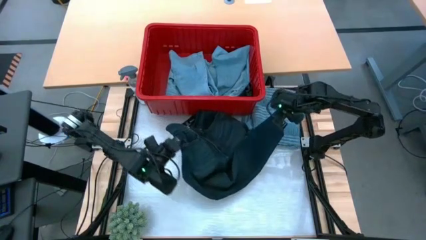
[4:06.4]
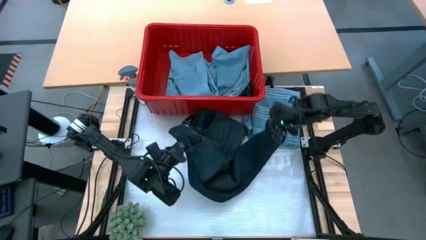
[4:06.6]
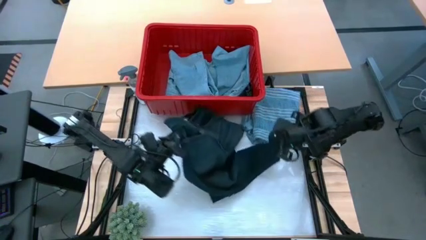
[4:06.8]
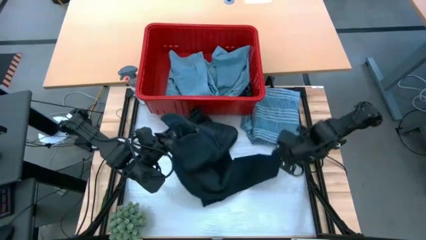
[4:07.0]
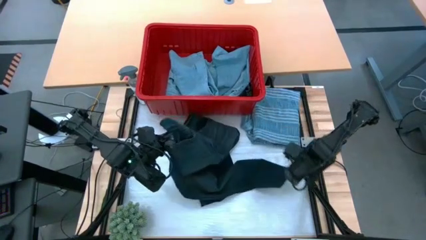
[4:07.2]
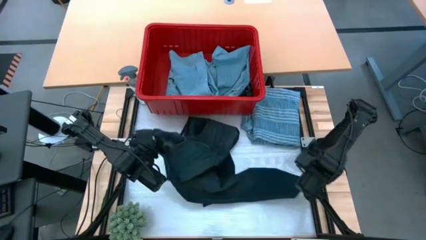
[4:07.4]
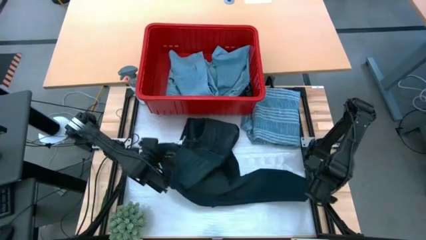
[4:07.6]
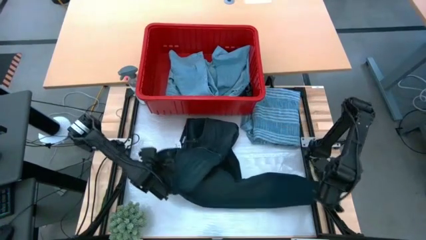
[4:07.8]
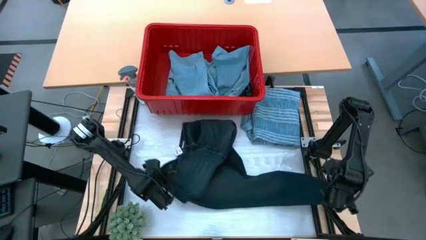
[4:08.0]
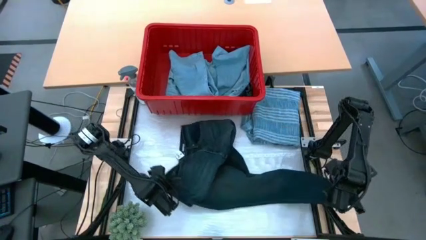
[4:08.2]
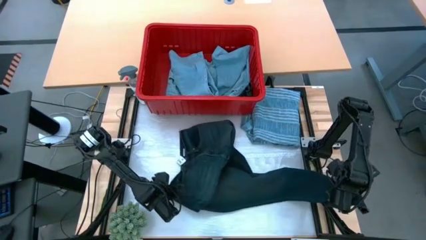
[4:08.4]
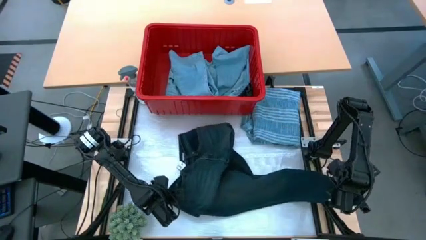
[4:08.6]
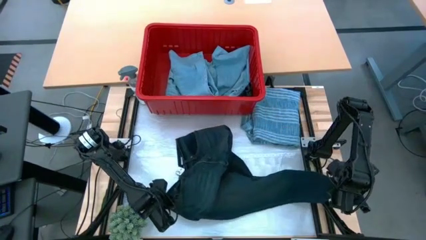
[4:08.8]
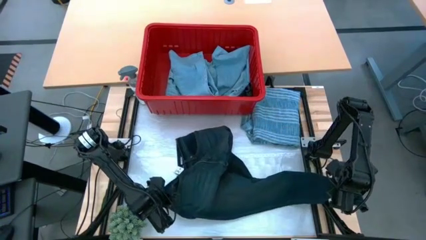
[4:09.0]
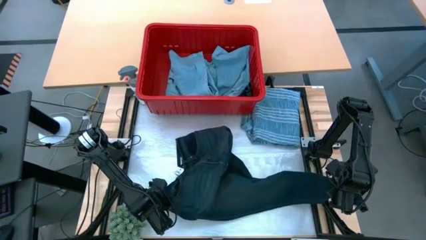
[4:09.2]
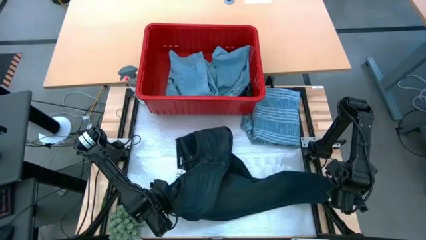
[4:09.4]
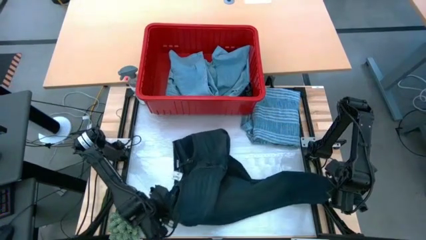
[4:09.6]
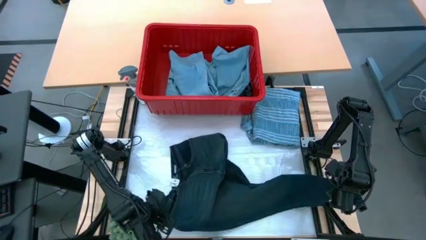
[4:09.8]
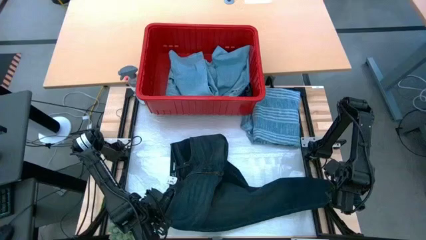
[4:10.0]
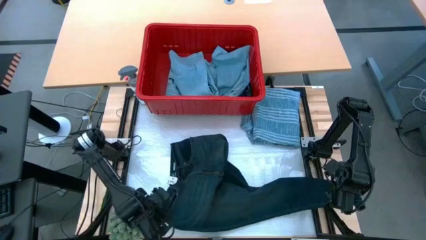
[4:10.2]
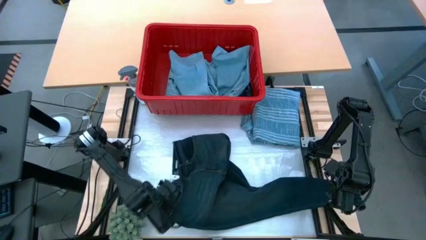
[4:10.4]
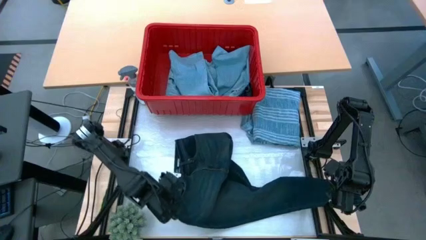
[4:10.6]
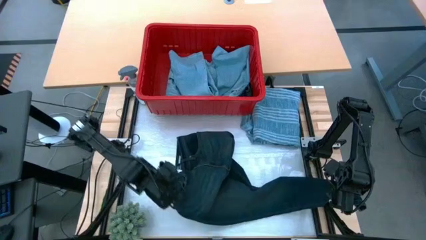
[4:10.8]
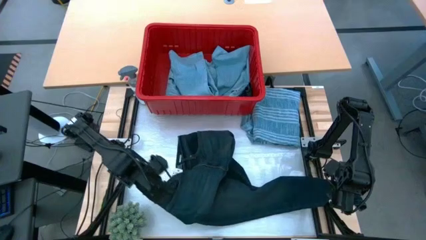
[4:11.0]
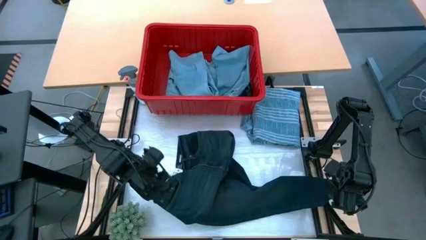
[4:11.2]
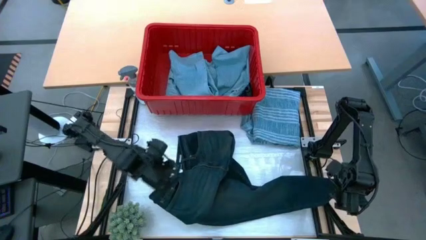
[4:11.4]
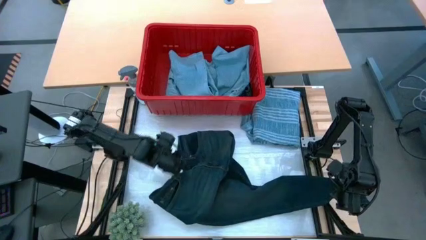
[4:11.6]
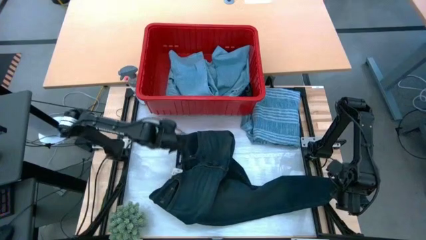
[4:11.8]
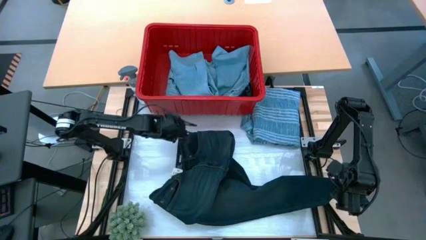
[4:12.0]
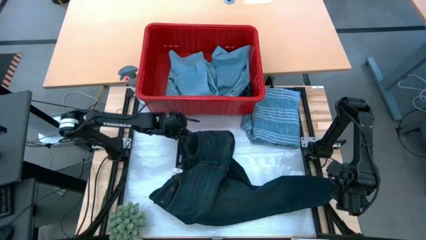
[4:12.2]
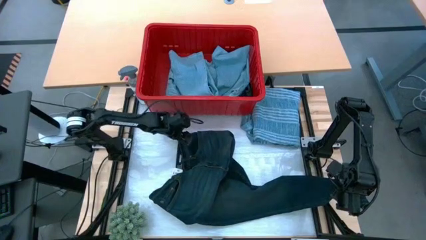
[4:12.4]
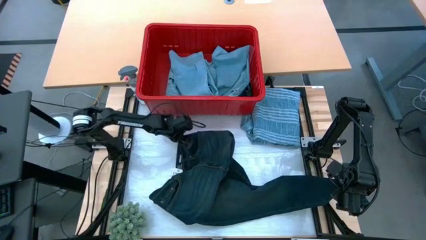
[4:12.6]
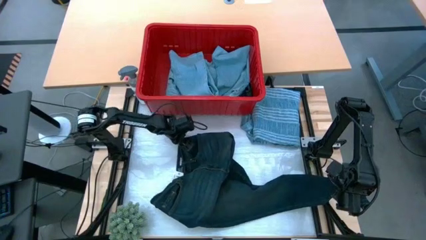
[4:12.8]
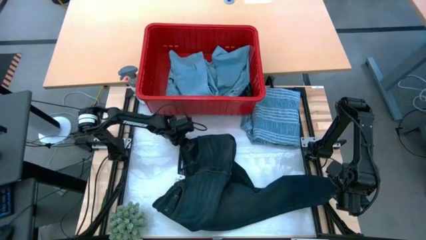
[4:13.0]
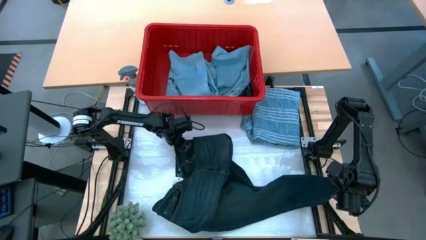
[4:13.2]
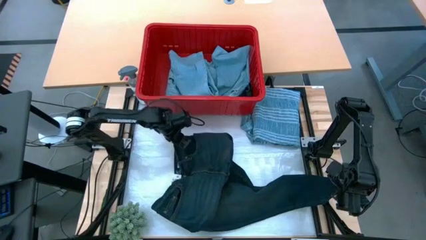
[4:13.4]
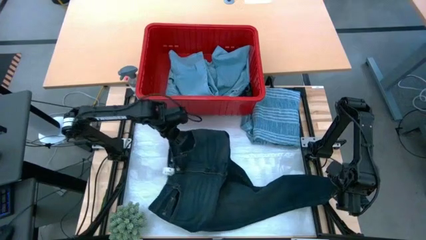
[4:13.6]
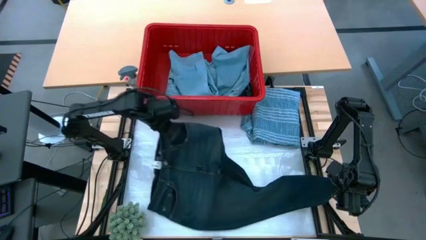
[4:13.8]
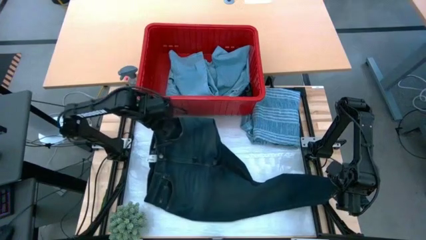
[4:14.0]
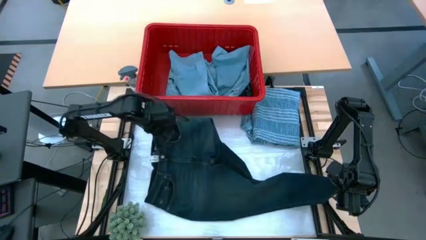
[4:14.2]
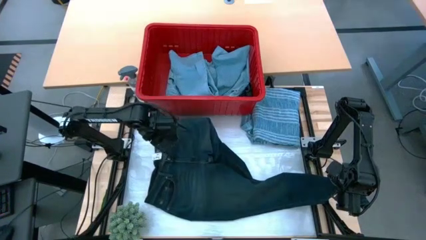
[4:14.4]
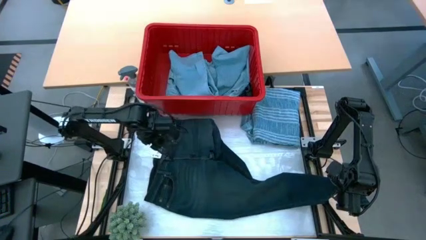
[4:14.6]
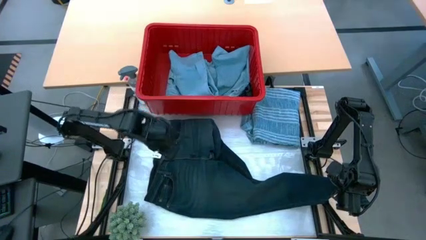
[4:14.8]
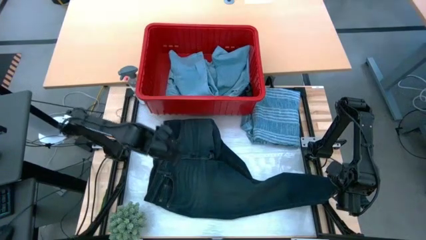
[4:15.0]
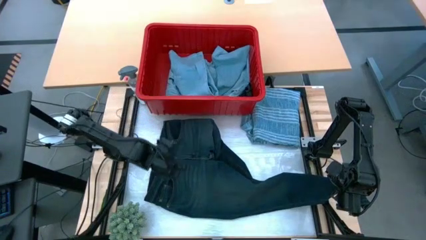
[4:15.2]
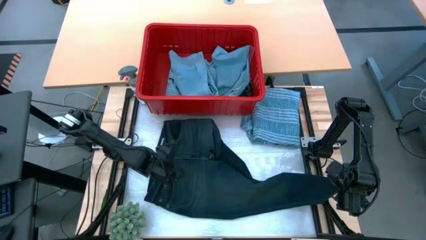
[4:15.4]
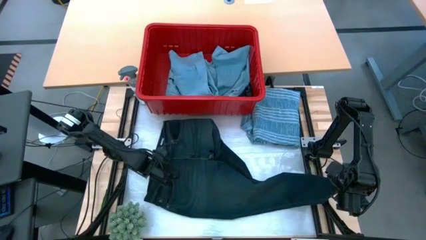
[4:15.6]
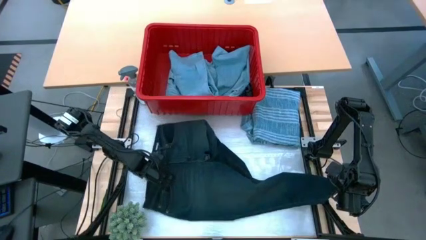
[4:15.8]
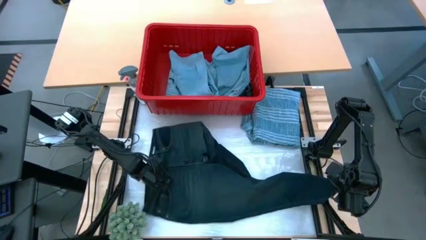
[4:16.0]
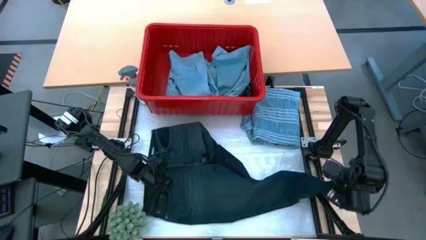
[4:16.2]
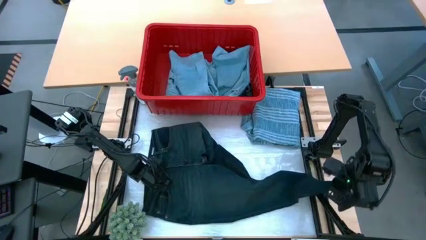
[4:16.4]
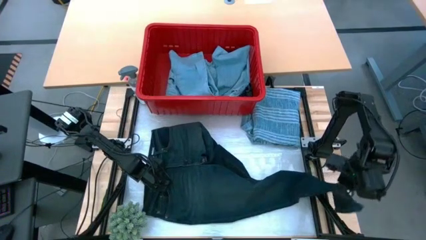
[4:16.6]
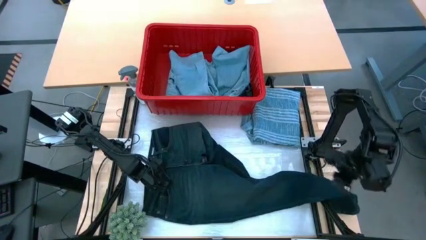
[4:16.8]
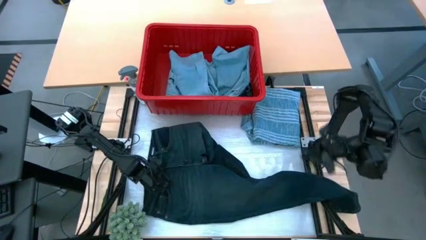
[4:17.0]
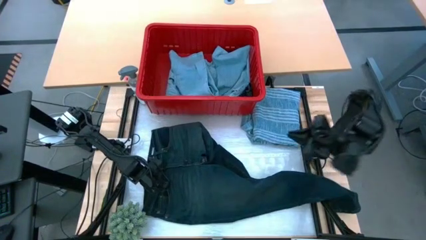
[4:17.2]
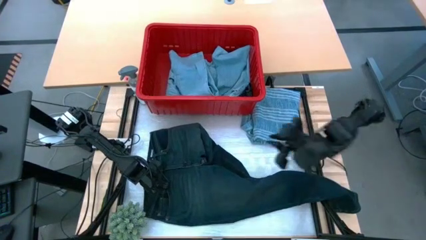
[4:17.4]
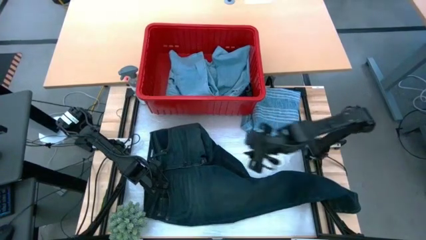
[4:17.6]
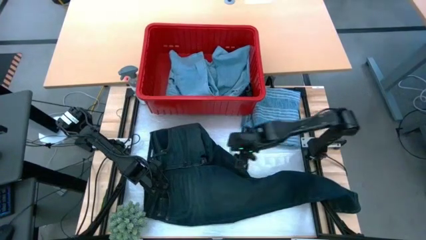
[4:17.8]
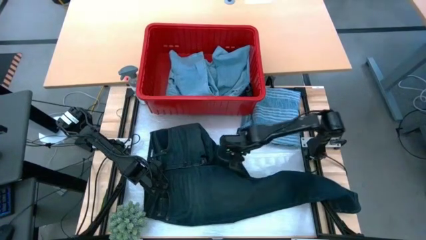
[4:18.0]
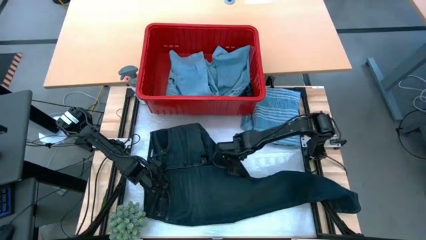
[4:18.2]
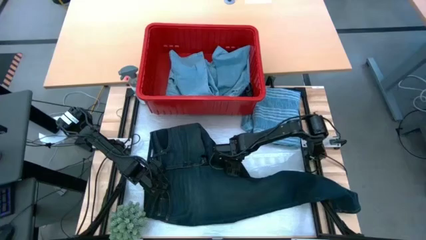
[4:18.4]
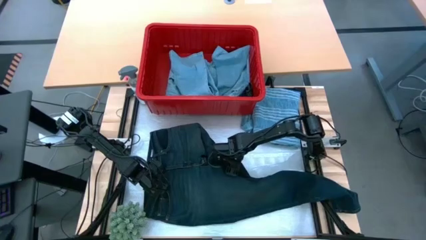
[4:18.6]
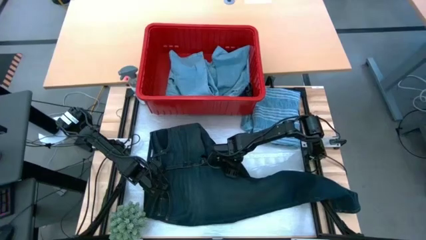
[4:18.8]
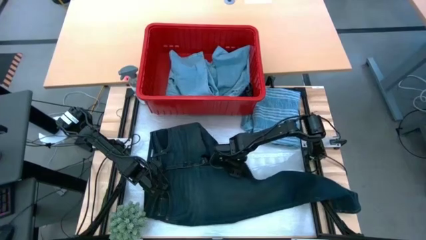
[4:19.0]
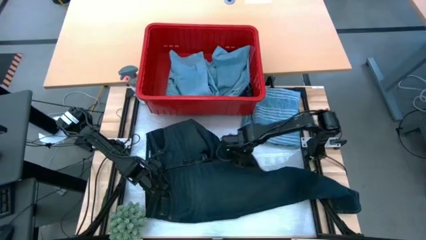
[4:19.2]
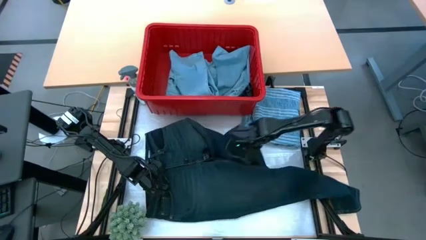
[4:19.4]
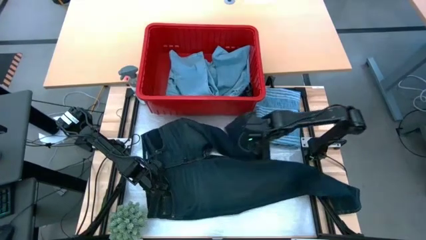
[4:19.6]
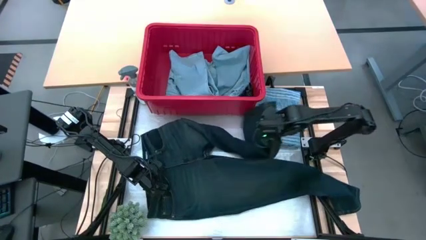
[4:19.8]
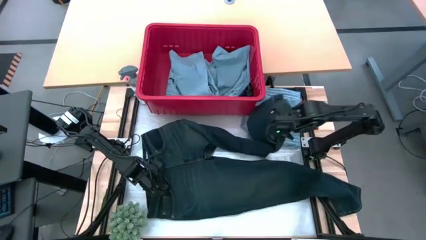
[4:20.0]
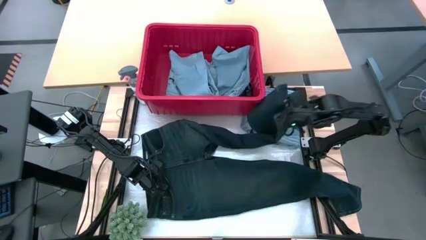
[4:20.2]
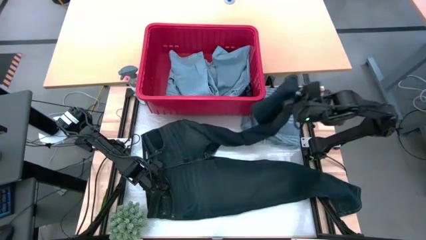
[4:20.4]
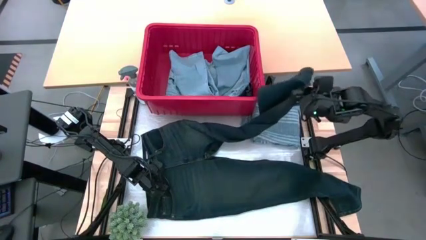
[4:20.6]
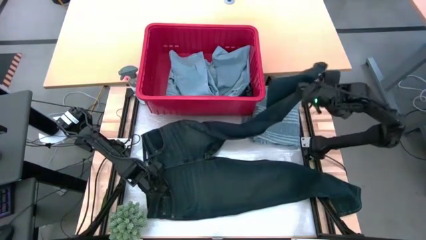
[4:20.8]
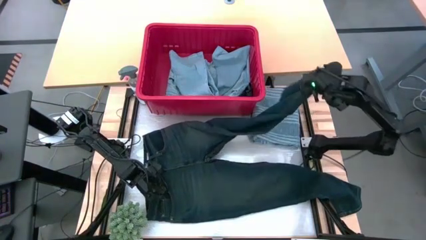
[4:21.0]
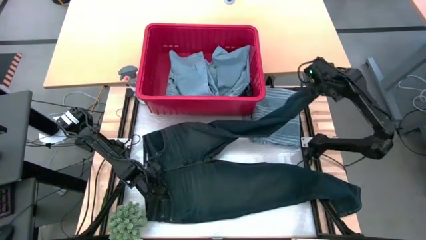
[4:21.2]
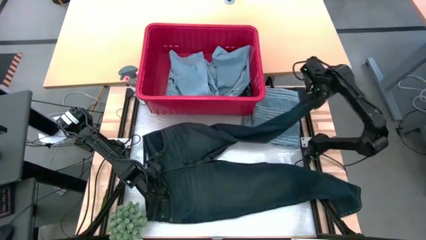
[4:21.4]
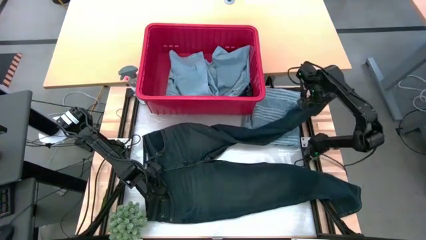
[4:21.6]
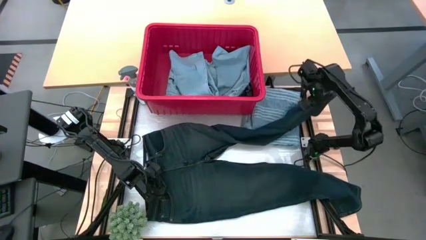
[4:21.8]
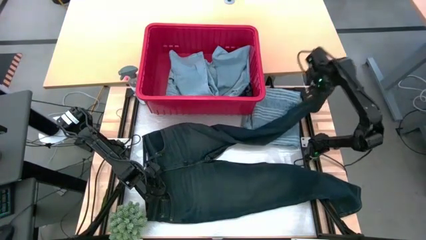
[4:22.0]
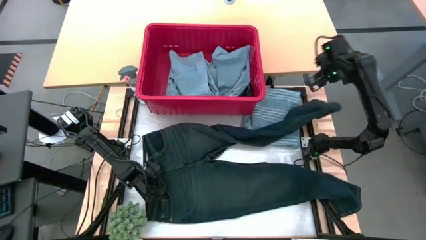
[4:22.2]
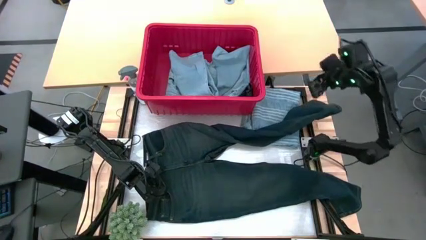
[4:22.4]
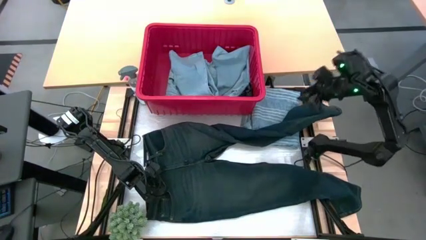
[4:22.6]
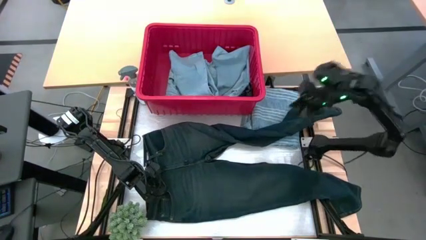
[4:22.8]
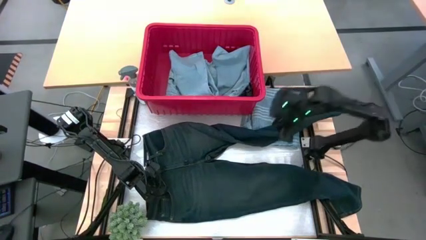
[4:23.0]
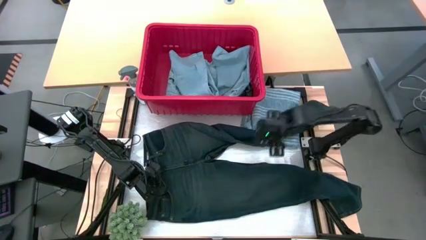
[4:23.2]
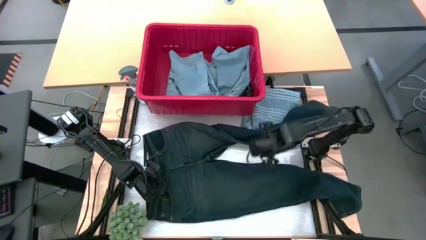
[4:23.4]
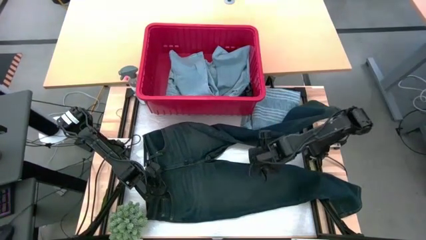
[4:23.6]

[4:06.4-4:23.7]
Task: Fold Laundry from Bin
Fold the black pants
